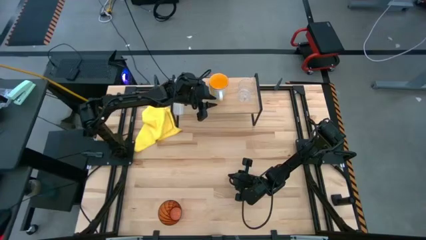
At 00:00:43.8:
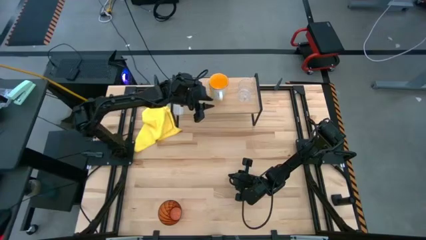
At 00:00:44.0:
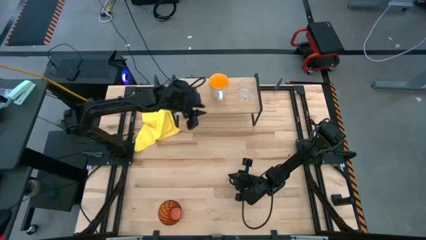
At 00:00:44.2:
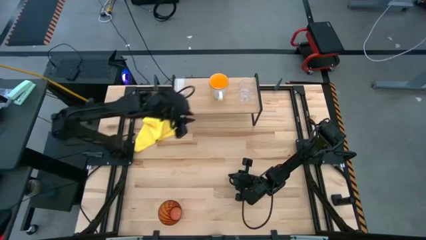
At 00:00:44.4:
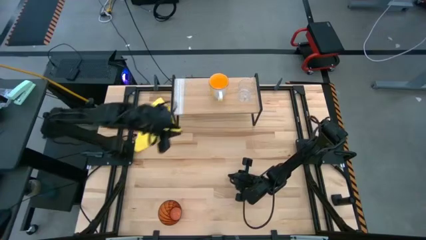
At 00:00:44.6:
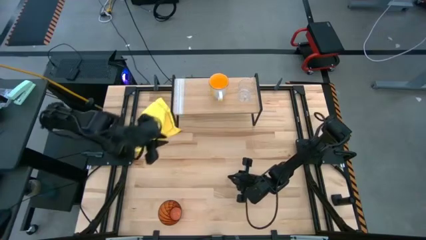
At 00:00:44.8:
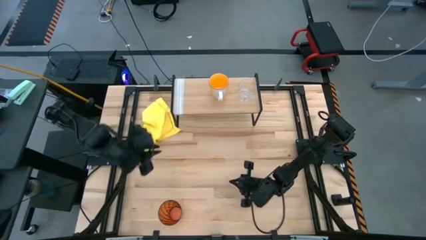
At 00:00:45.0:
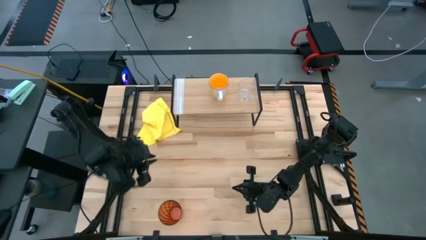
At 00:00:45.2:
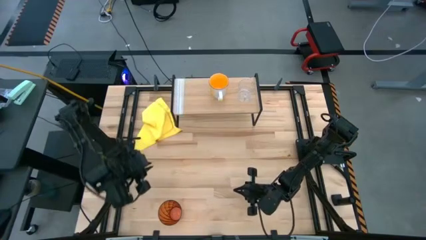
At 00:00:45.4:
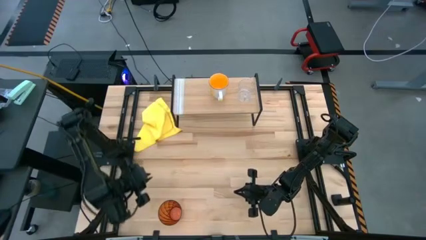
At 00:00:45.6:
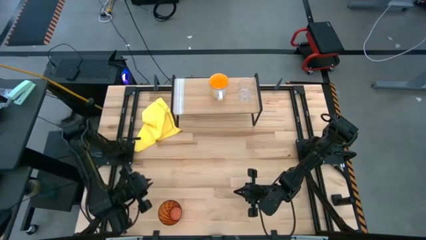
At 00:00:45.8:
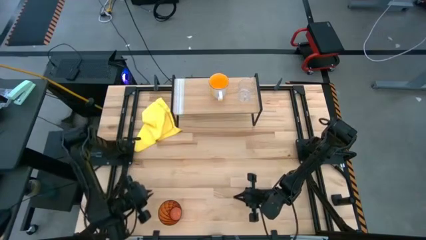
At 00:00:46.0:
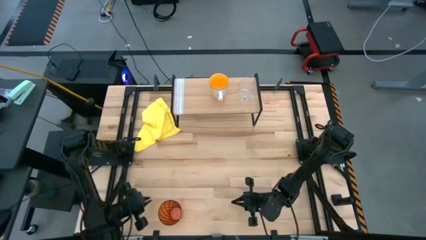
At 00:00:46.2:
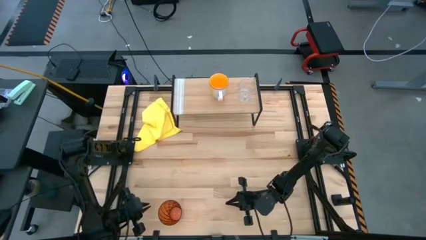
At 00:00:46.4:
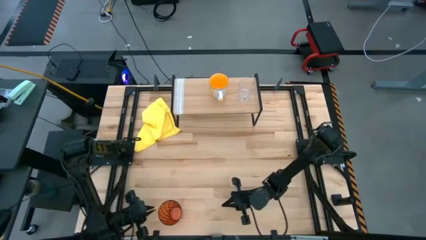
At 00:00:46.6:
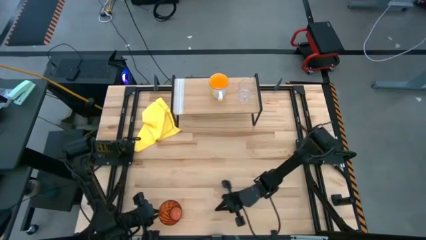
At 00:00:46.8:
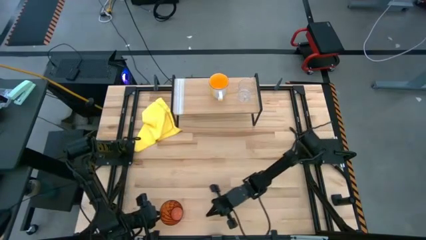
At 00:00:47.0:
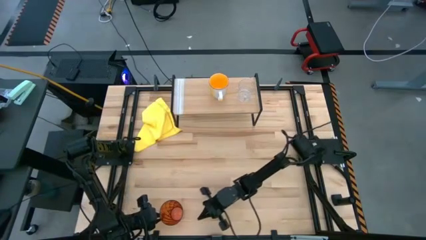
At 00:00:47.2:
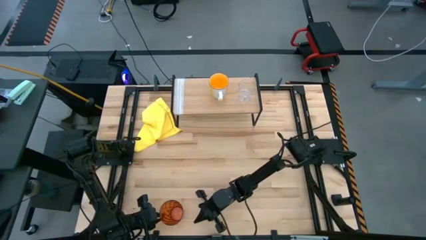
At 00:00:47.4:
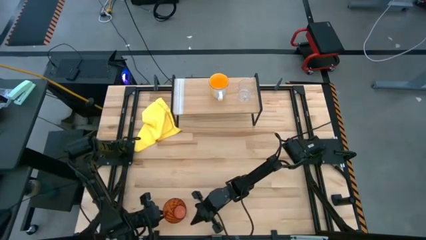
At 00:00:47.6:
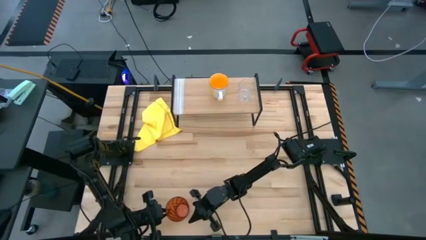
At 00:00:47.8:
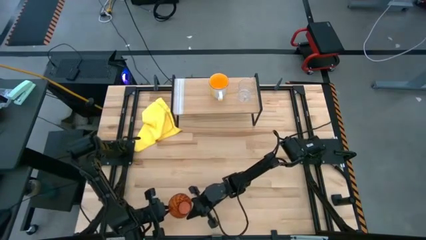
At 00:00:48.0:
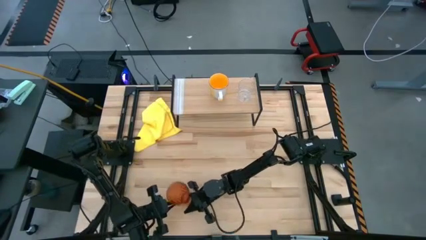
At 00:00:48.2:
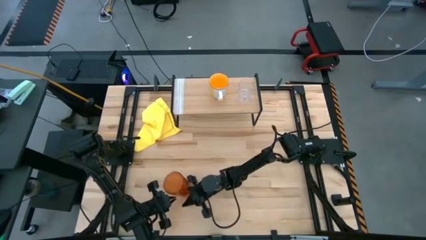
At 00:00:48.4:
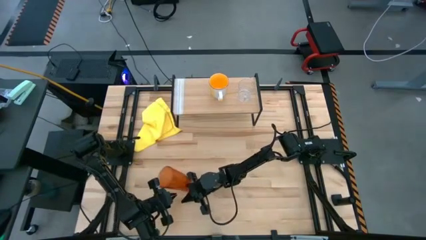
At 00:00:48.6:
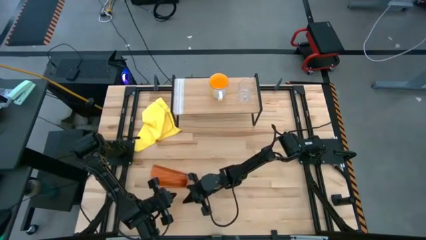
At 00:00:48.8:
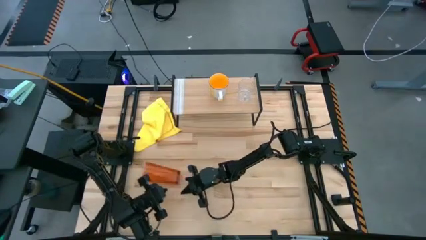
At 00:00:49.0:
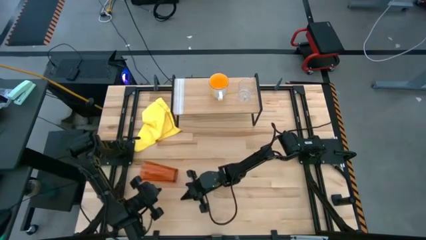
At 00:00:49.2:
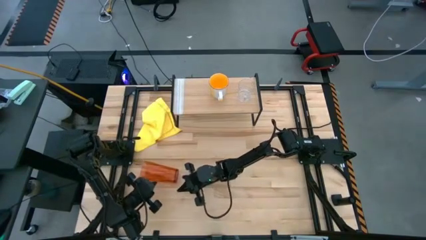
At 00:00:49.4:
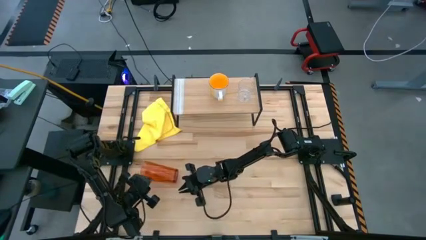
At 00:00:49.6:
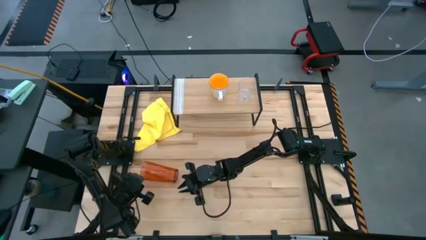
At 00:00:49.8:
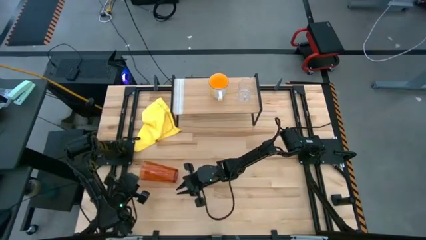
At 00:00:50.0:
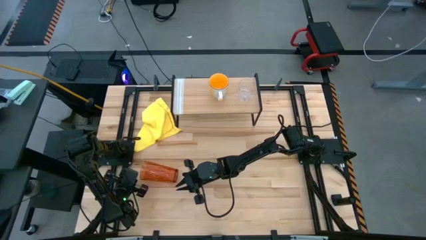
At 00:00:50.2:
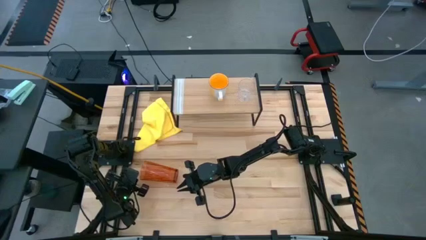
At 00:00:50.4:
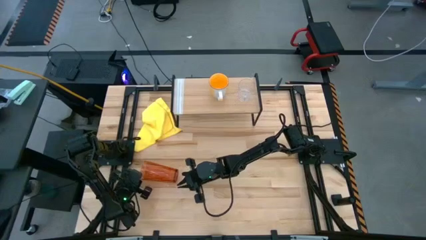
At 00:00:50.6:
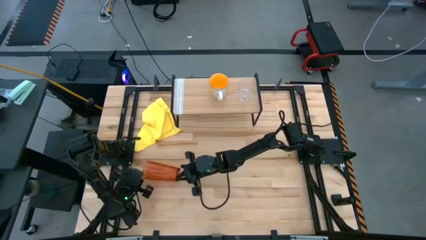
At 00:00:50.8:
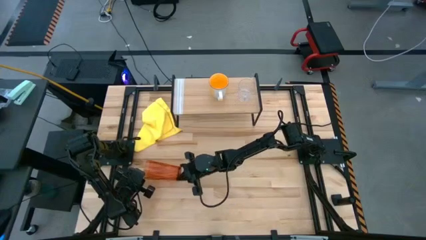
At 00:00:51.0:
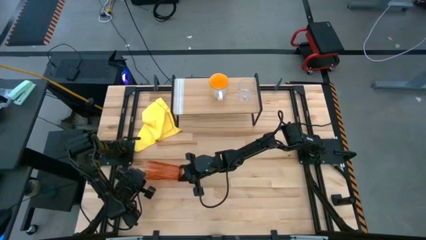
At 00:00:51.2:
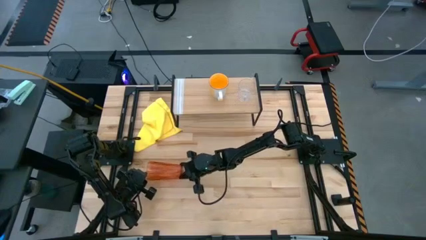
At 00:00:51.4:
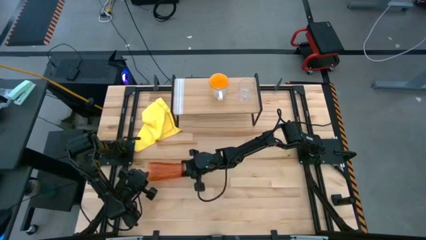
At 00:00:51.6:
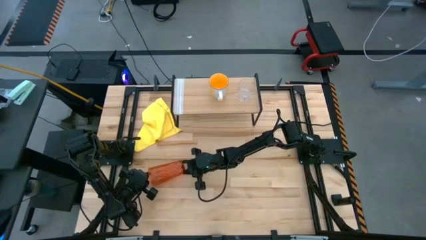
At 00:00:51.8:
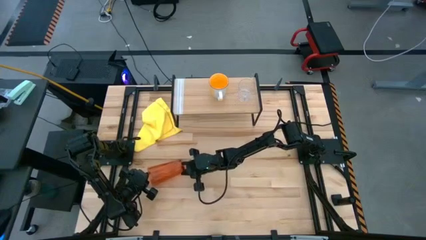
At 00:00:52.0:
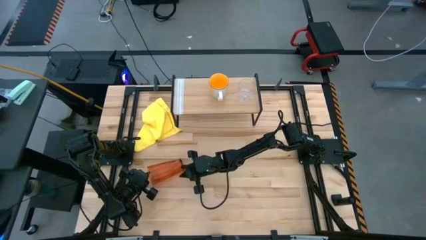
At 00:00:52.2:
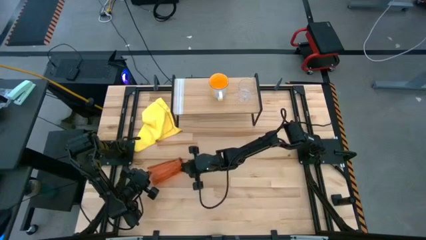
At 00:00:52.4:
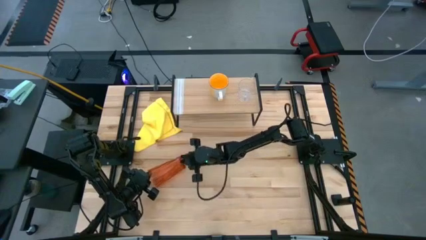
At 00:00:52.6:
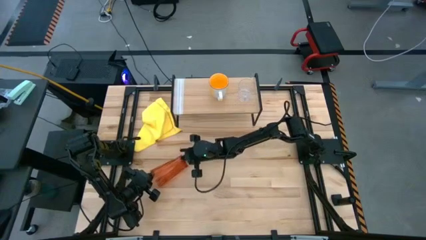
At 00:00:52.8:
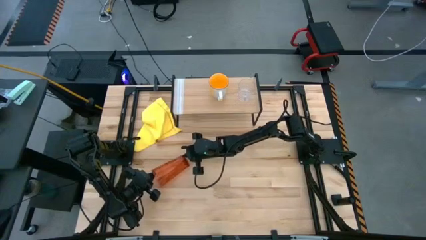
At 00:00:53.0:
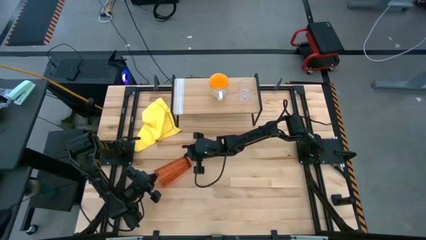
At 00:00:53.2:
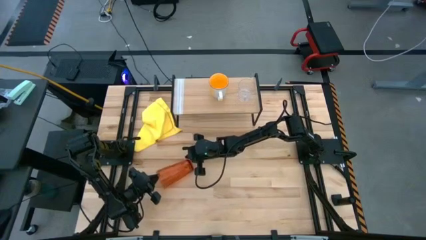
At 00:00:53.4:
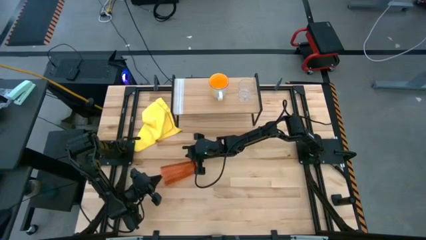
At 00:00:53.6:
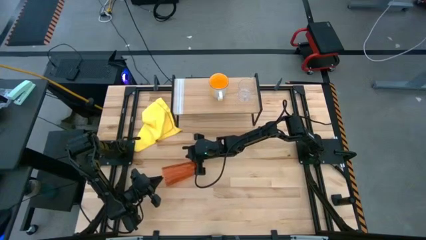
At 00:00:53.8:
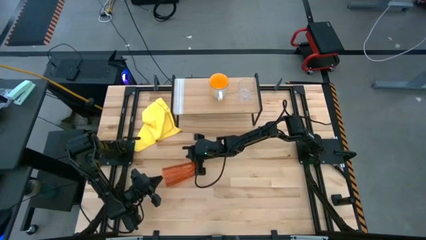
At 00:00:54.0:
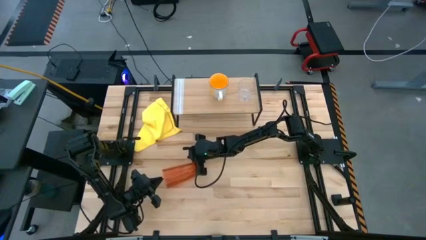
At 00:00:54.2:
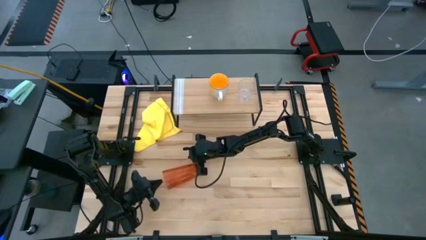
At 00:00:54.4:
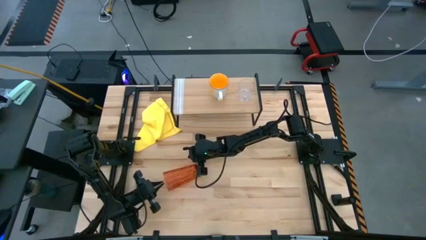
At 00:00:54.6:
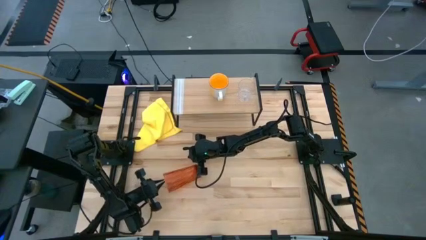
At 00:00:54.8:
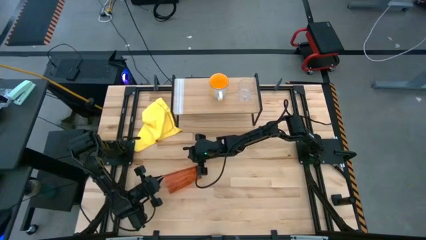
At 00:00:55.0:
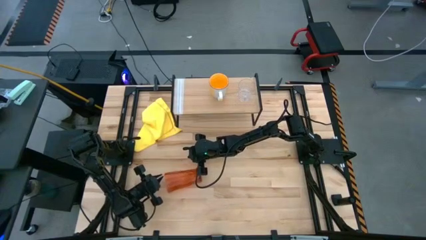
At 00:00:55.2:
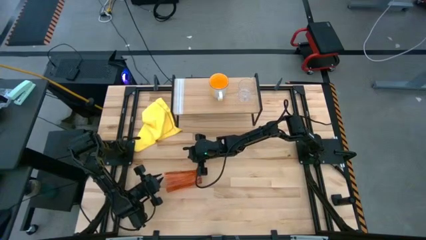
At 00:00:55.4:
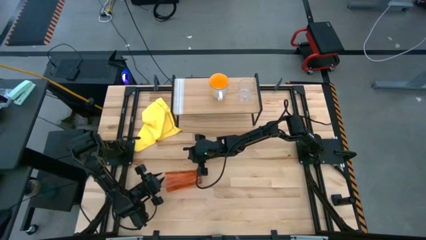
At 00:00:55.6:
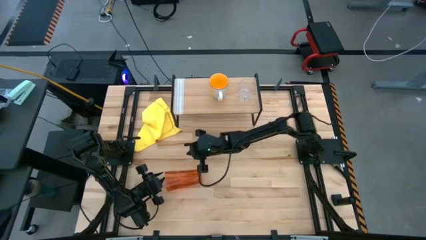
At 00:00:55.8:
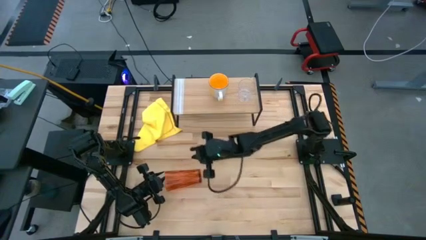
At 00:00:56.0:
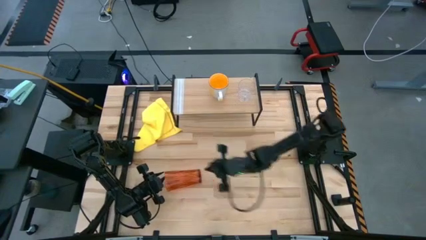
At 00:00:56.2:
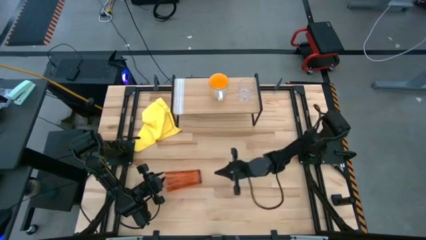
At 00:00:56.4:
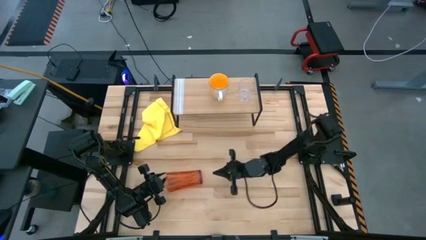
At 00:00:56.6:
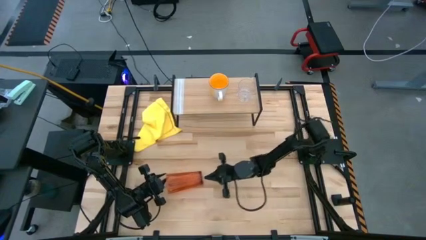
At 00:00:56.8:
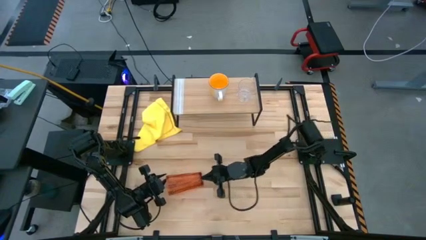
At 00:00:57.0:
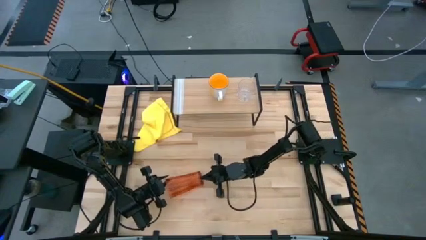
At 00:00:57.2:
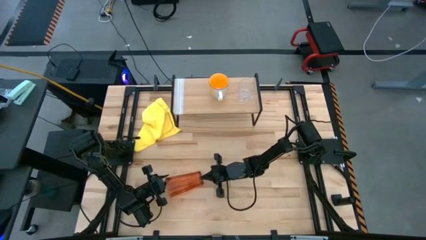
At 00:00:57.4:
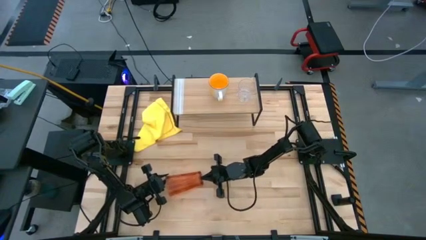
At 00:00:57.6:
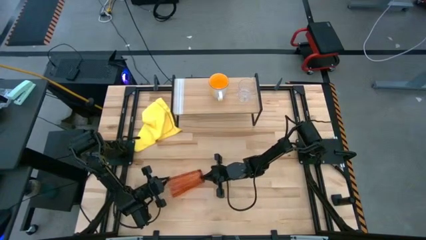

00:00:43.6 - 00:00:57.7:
Task: Stack small to large cups/mugs on shelf
Put the orange cup on the shelf
